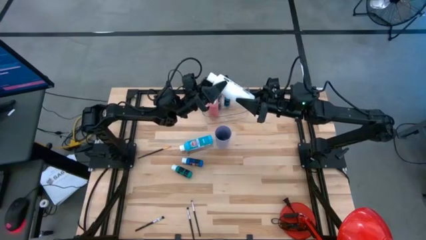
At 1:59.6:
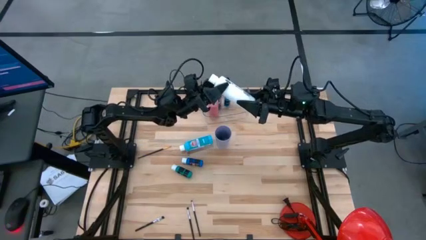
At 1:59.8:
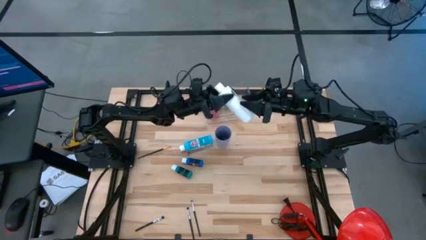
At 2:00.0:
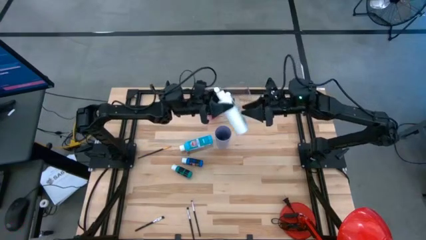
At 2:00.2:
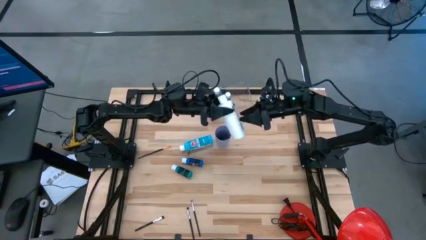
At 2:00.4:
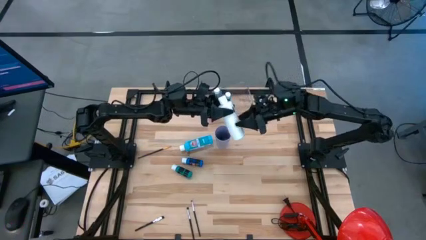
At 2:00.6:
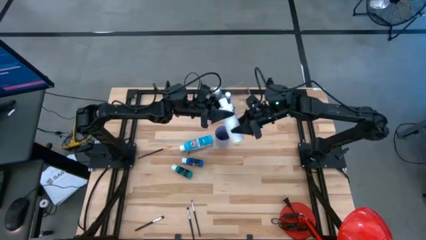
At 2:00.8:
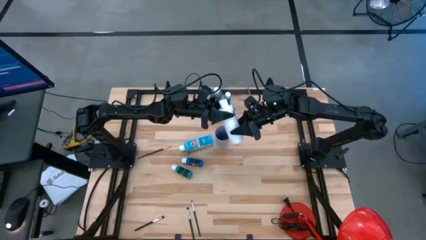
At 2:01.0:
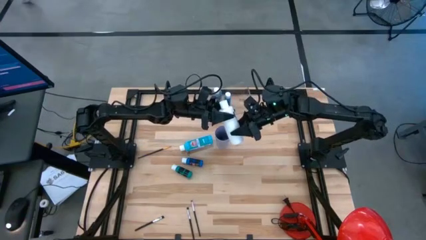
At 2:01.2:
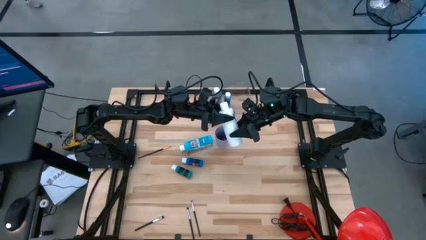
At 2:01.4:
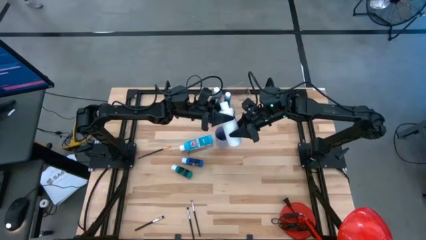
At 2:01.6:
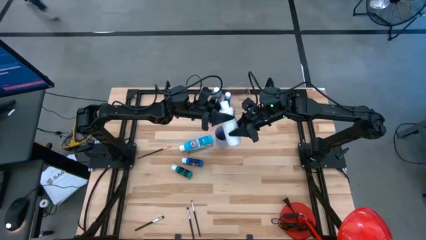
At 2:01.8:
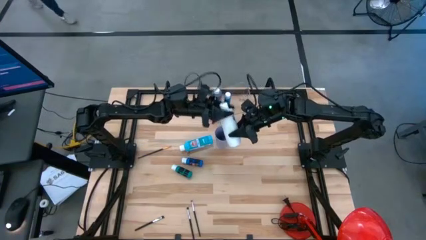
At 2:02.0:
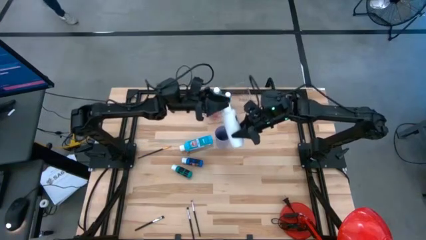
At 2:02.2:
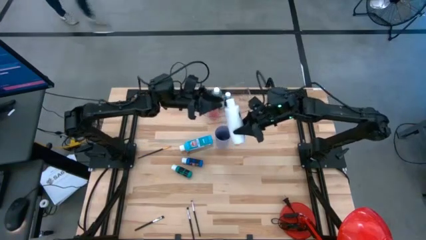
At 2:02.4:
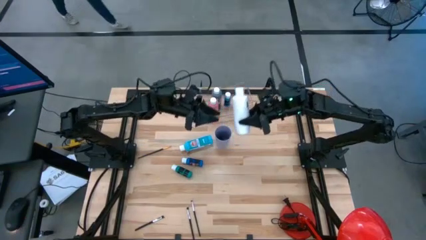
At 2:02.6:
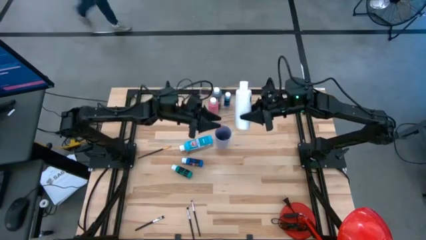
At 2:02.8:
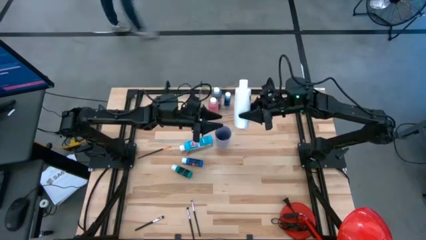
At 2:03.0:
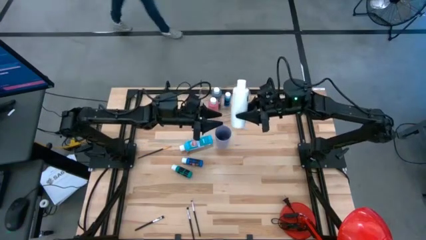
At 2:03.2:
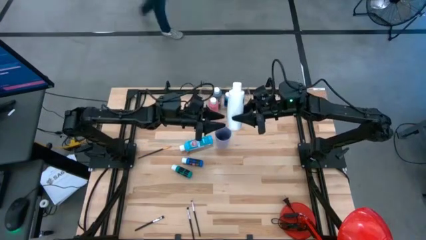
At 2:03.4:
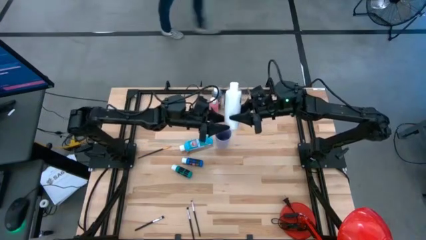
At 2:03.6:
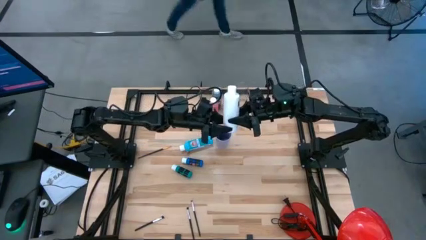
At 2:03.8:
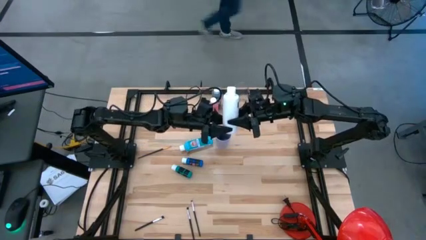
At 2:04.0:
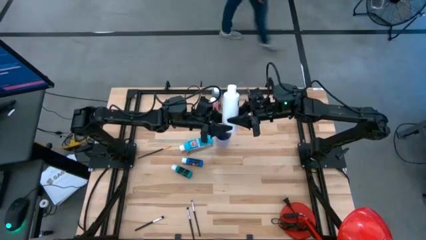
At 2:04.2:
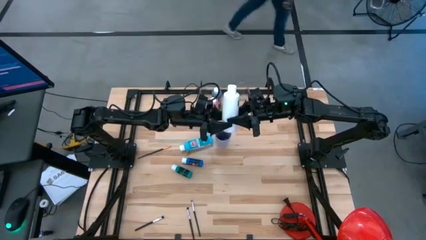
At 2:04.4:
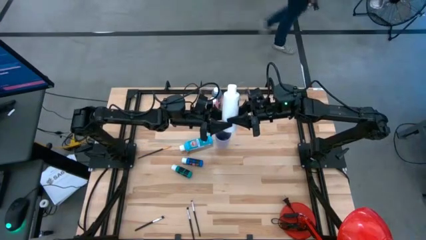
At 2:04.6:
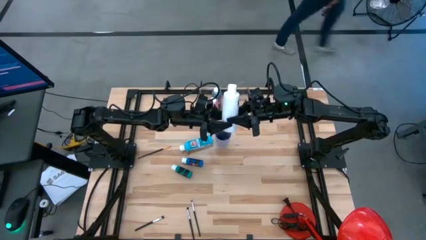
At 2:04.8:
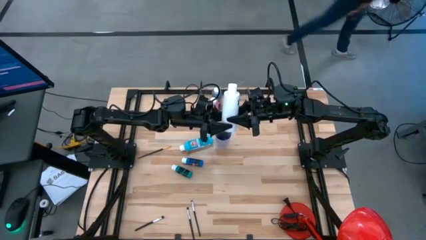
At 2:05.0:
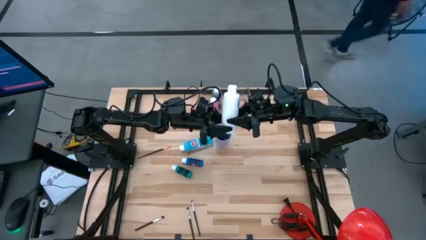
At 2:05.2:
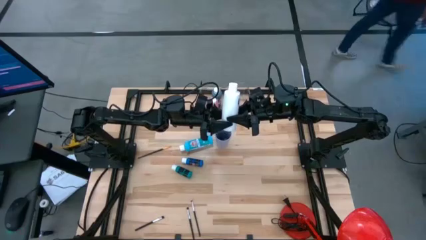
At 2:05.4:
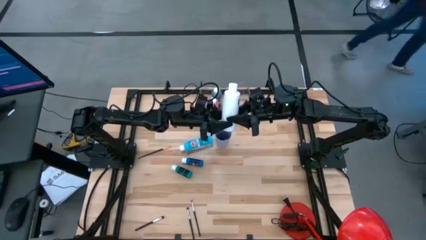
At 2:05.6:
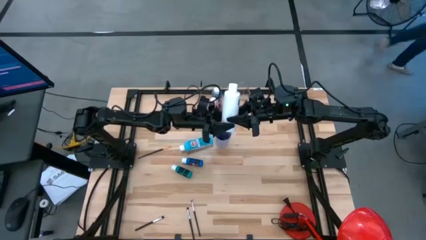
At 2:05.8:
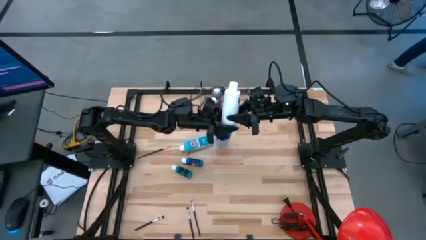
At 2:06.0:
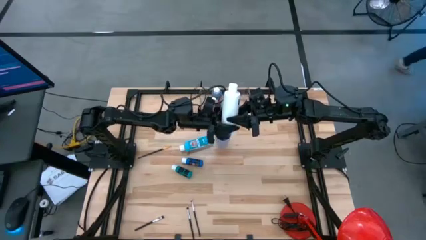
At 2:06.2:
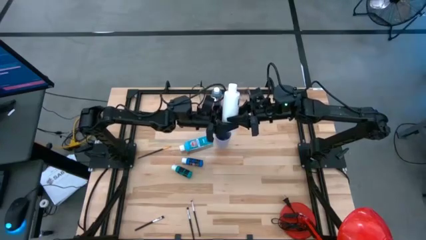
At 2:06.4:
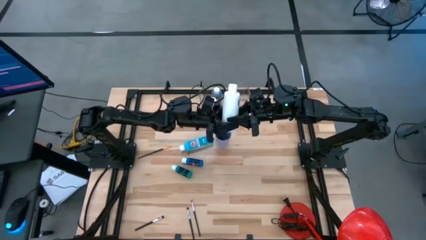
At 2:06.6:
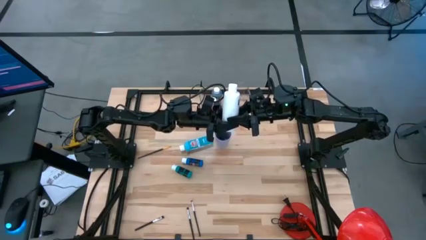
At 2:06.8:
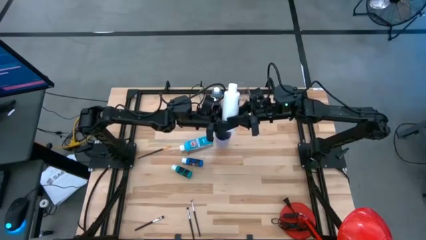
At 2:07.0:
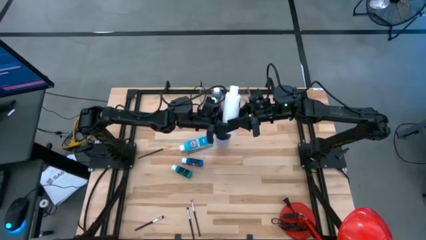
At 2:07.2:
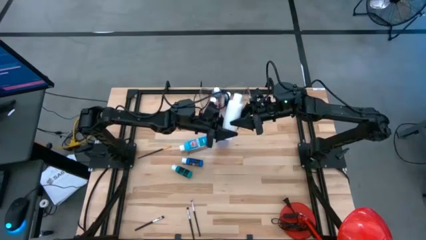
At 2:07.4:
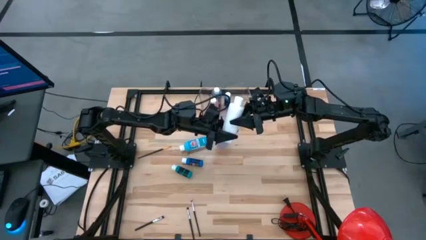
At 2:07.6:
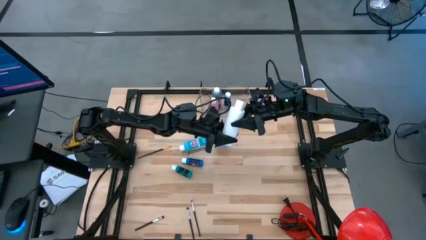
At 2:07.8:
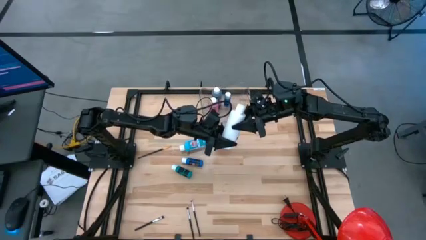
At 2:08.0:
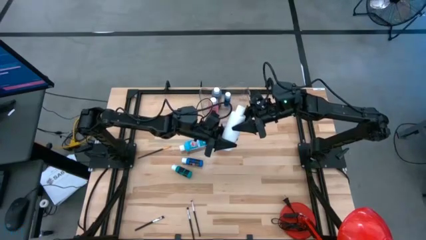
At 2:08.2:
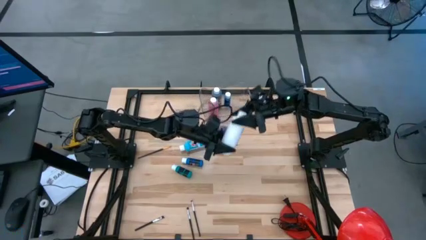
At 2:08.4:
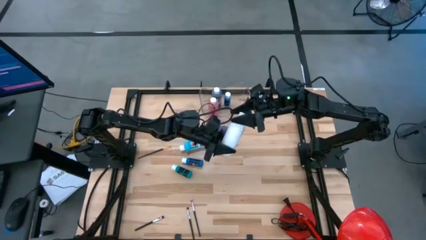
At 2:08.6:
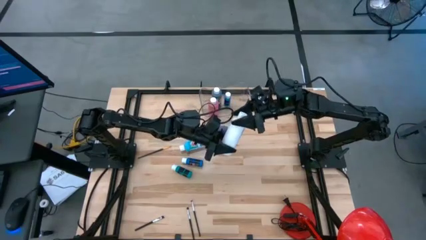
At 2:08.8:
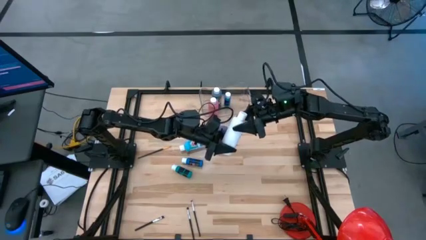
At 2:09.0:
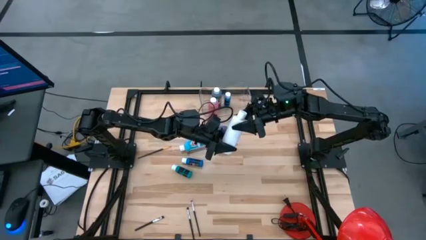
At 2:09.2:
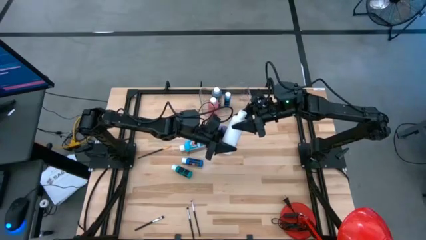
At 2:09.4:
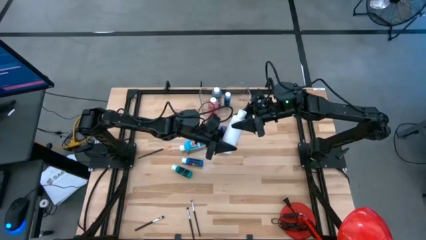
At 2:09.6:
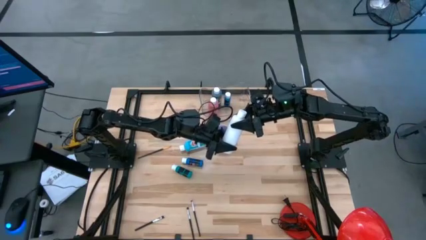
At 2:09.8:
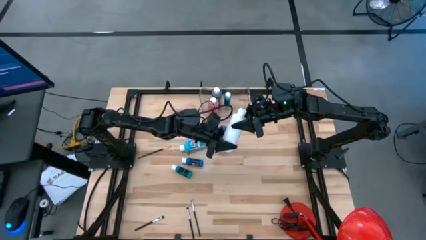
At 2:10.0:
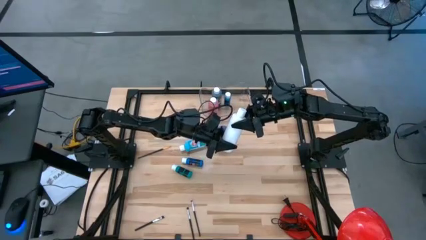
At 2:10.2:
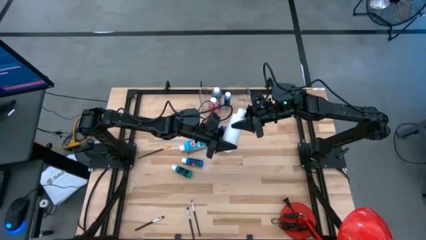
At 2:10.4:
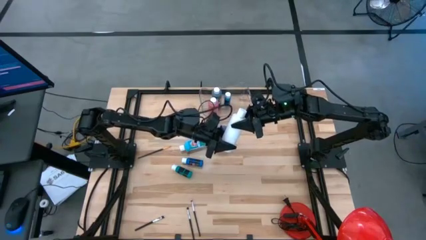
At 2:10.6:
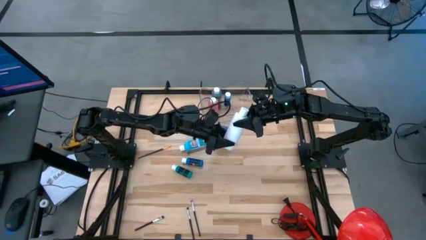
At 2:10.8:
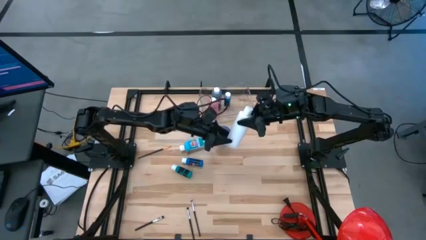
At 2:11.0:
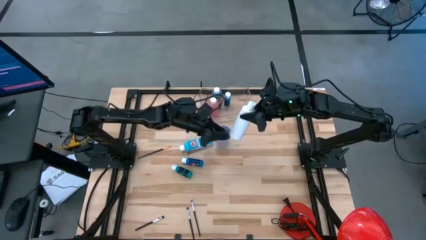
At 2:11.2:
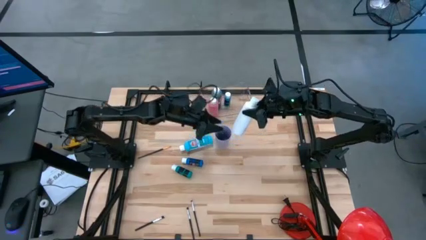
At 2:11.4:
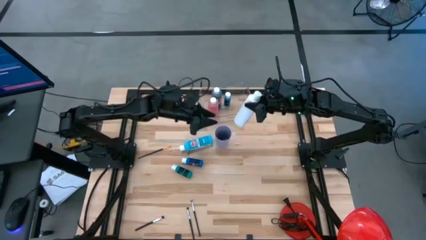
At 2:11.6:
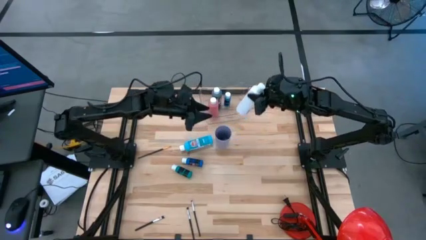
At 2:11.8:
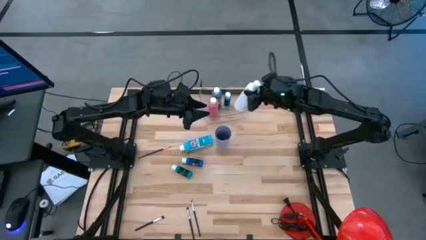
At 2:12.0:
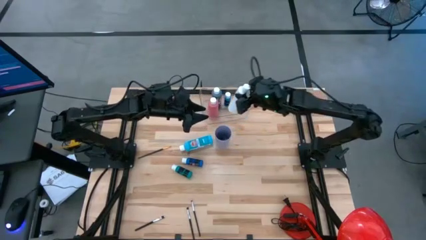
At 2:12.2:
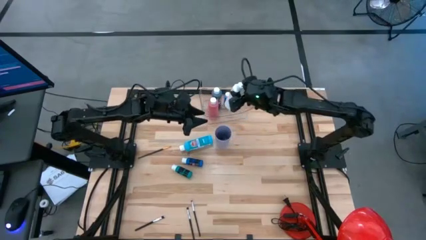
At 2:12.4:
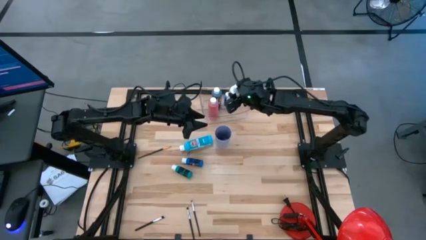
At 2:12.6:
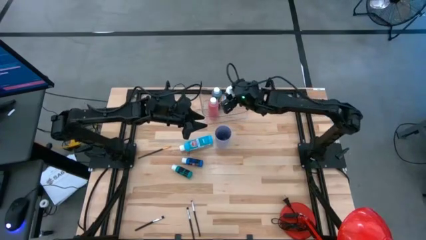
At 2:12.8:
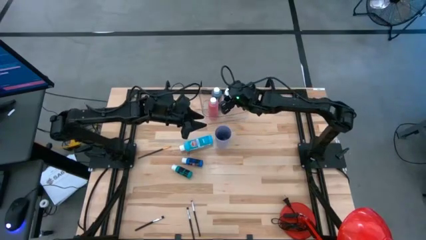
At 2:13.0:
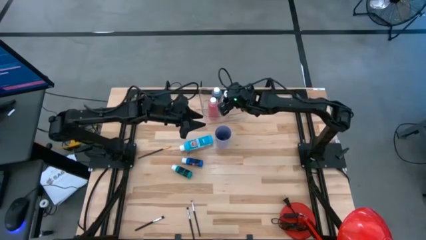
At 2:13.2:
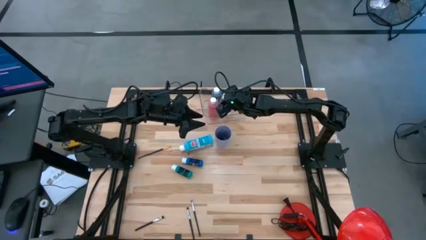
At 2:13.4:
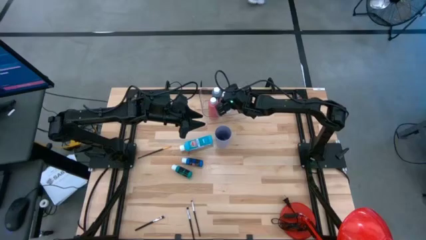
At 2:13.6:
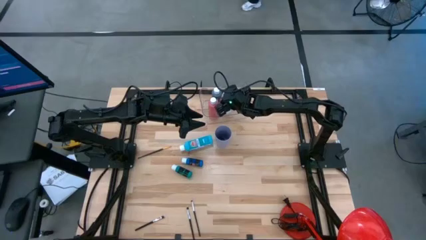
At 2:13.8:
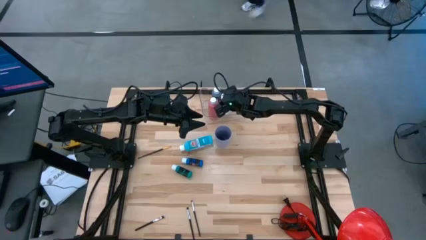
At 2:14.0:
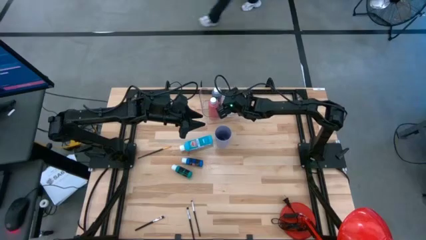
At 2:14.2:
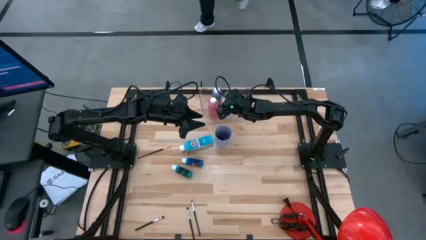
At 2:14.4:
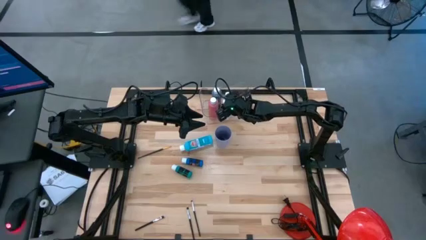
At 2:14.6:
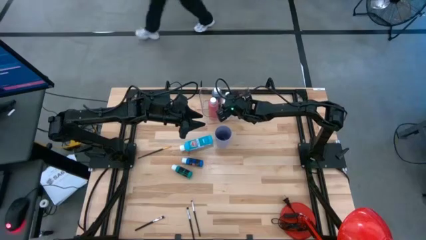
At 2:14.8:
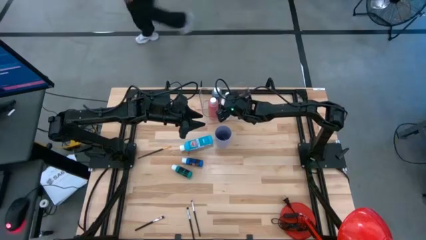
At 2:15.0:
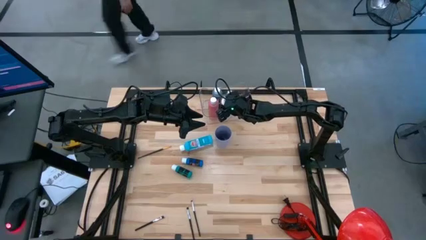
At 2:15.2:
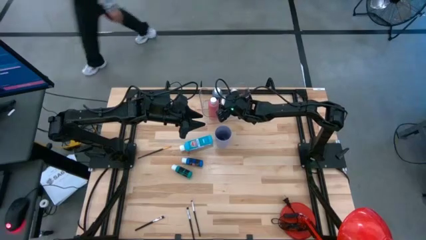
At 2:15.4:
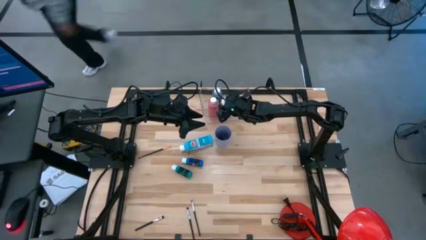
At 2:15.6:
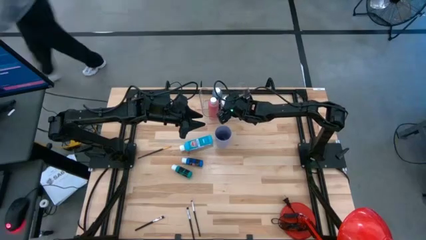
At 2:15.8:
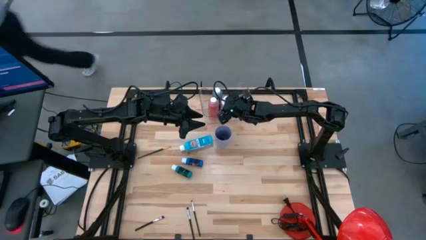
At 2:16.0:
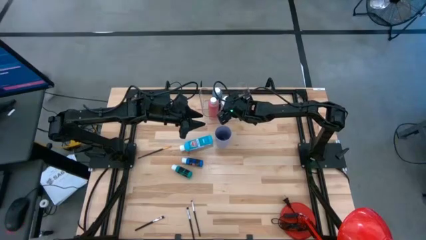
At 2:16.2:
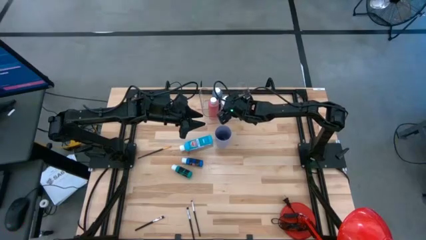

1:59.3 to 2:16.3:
Task: Pick & Place Paint Supplies
Put the white paint bottle into the transparent bin
